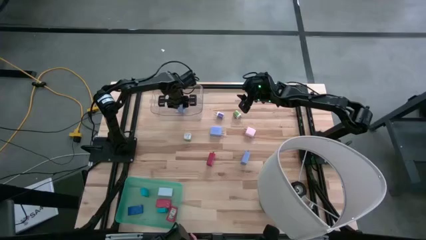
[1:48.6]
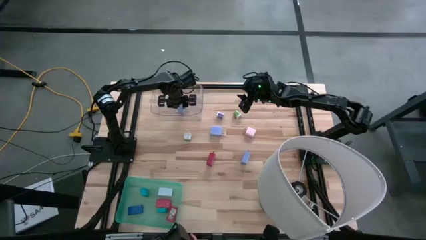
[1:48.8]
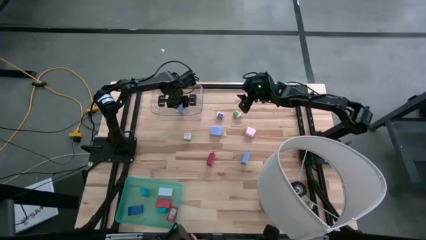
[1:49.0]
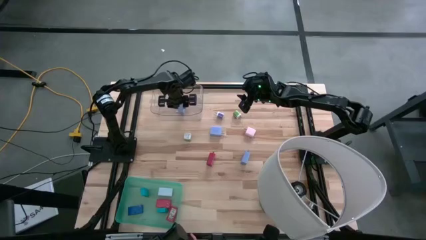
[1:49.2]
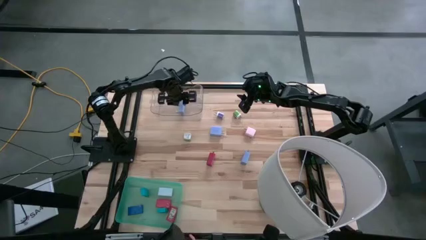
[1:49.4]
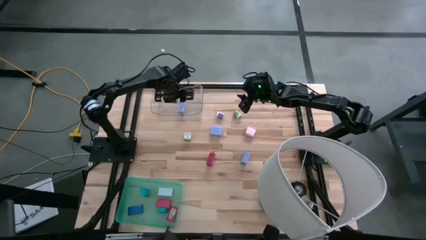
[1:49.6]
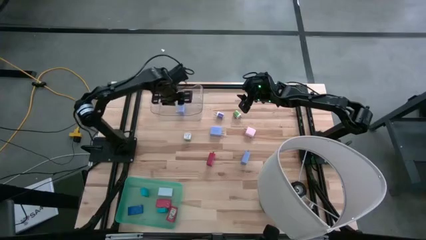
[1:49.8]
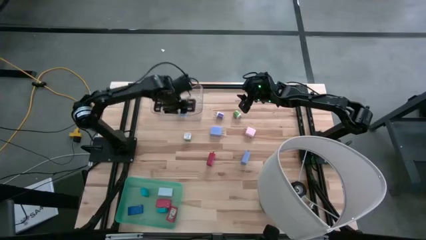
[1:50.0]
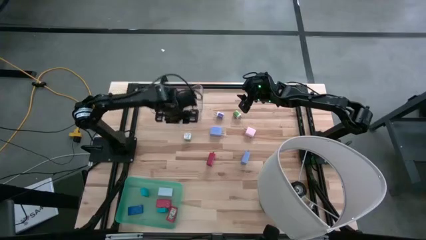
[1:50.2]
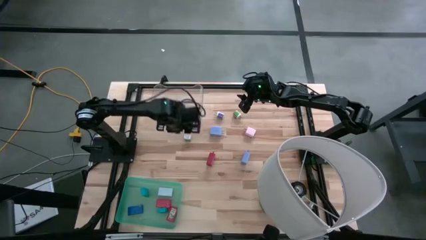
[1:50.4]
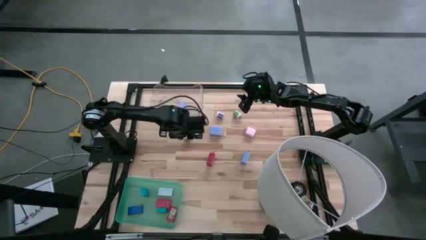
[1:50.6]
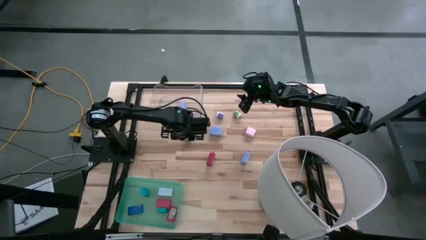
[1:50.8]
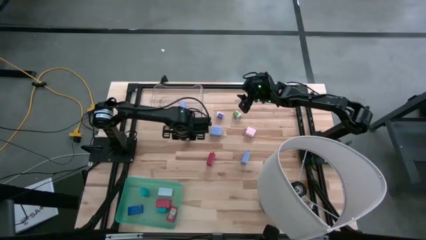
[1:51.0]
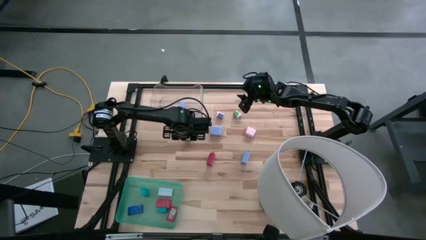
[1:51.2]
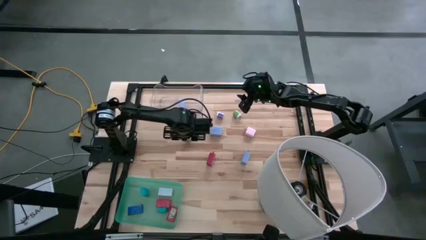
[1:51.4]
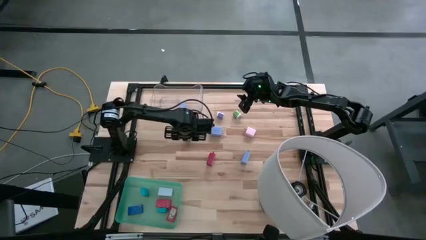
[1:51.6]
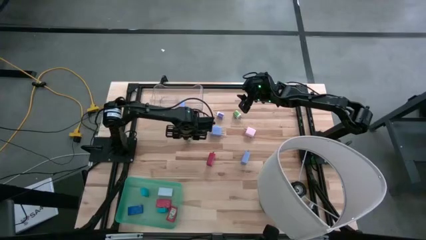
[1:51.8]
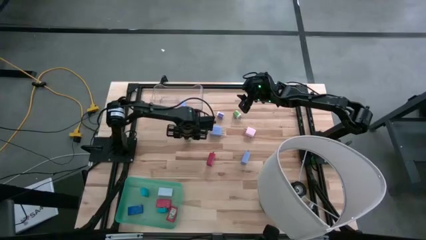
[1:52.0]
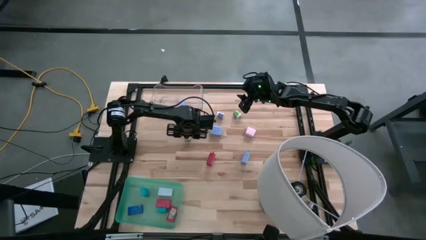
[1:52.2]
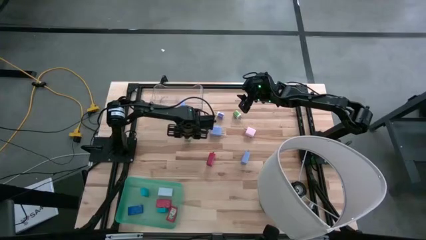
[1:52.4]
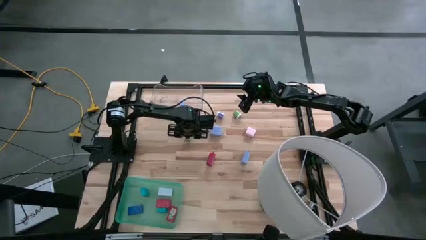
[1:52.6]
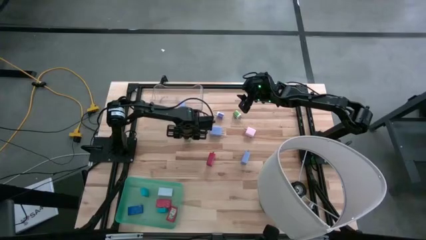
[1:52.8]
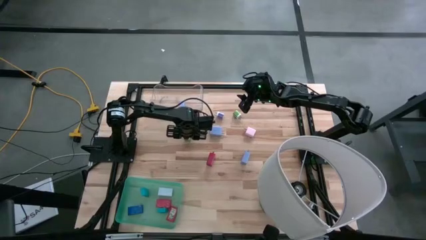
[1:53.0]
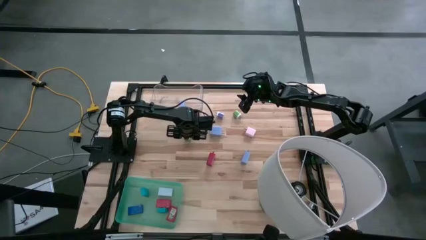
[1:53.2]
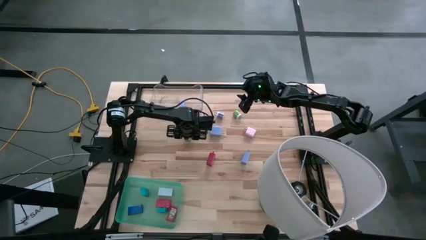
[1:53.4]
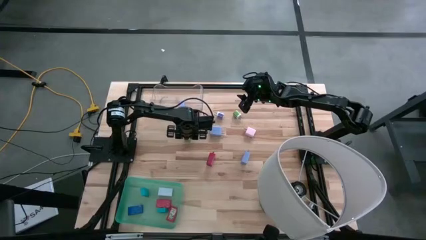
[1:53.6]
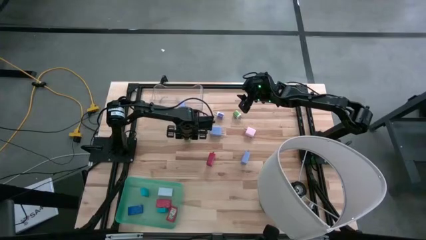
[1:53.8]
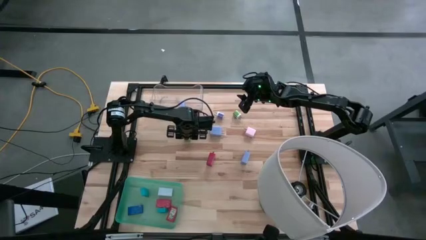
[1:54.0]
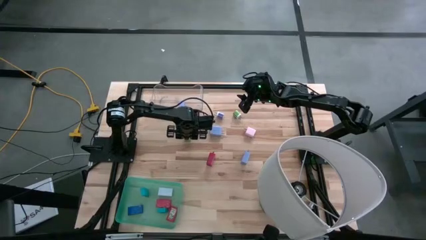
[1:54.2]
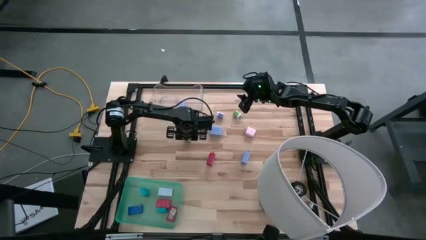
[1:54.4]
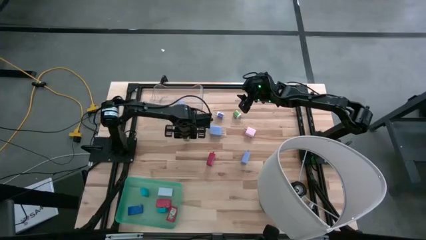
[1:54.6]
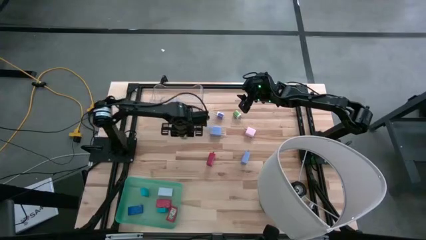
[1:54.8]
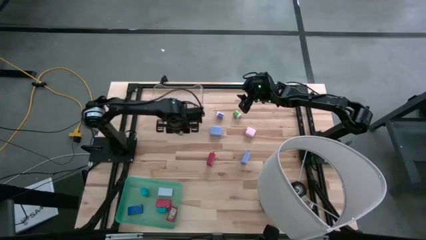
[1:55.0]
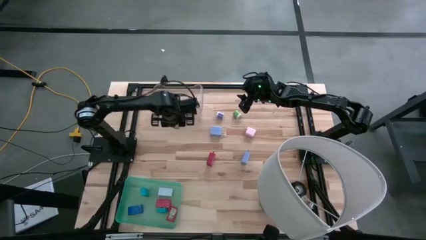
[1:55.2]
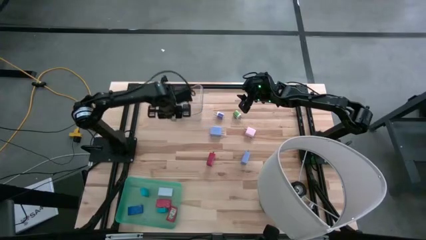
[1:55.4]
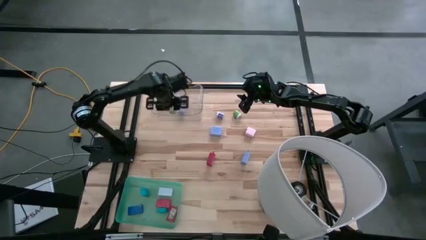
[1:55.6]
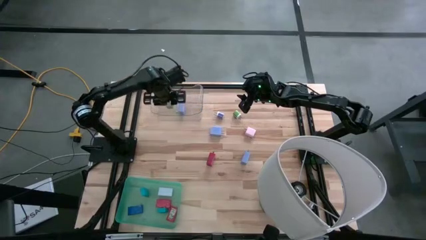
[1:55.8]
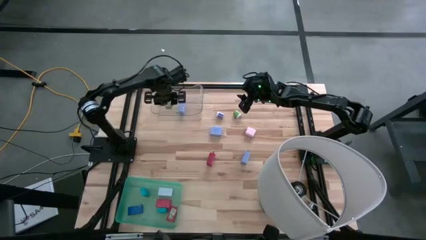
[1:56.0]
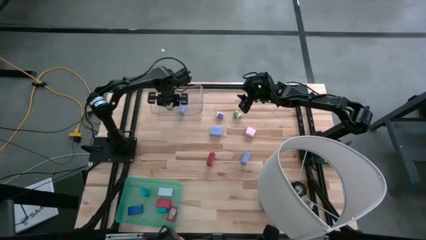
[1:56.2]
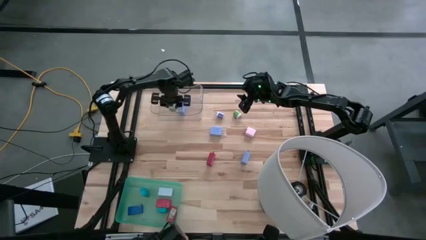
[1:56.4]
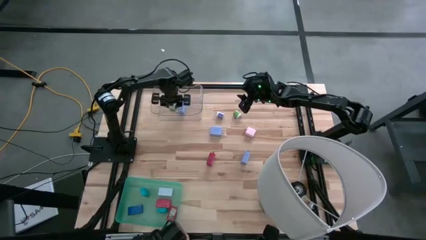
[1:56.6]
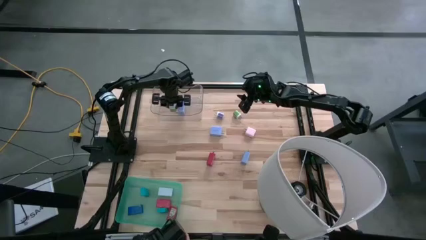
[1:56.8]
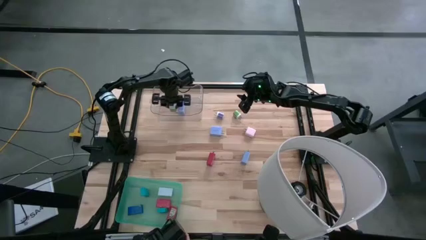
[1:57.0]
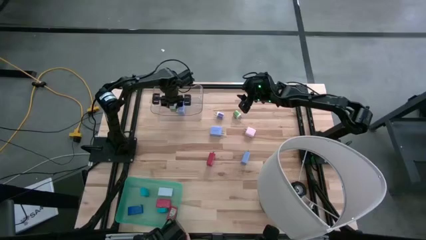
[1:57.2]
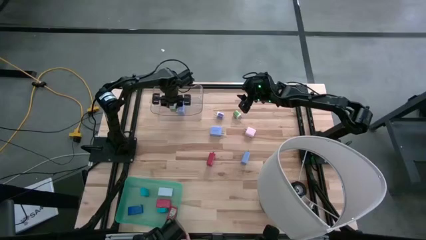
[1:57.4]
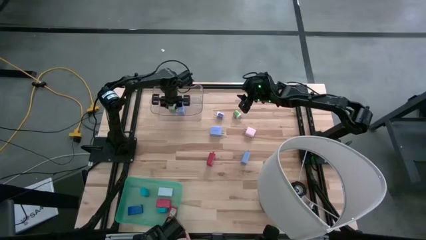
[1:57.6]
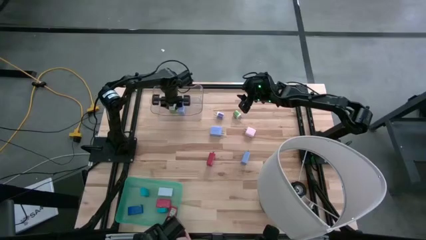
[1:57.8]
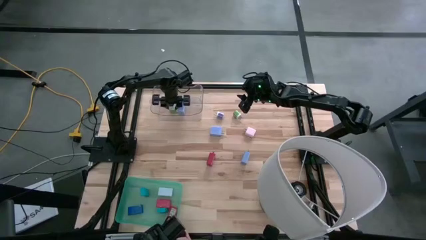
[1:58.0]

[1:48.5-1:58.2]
Task: Pick & Place Office items
Put the left green charger adapter into the transparent bin

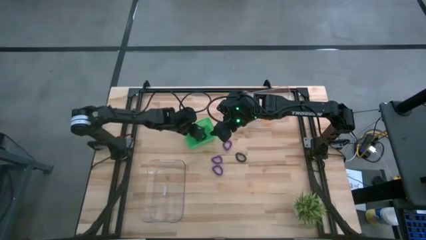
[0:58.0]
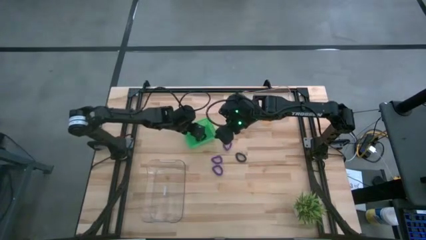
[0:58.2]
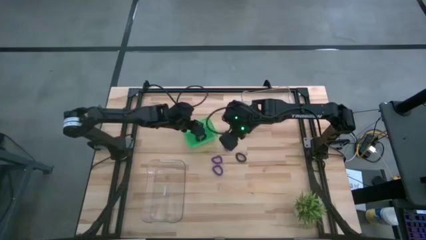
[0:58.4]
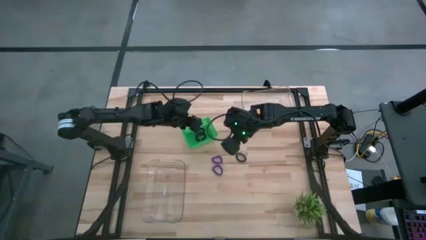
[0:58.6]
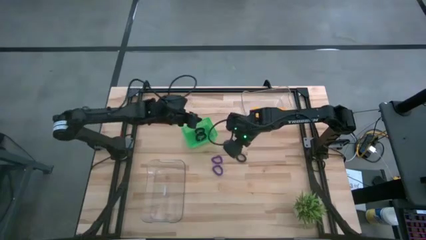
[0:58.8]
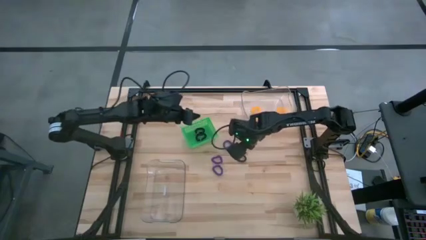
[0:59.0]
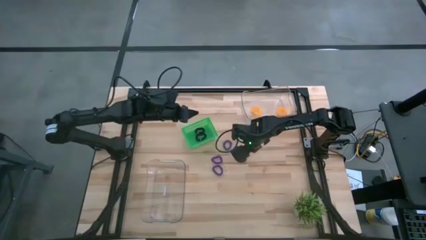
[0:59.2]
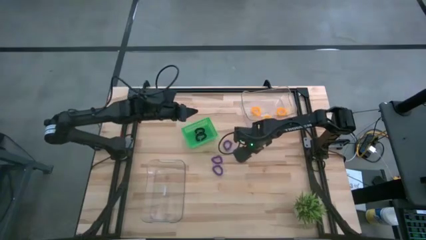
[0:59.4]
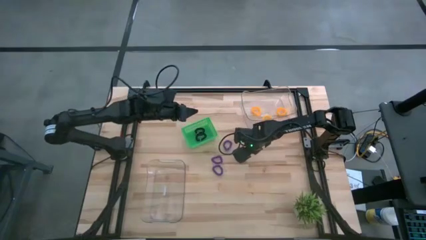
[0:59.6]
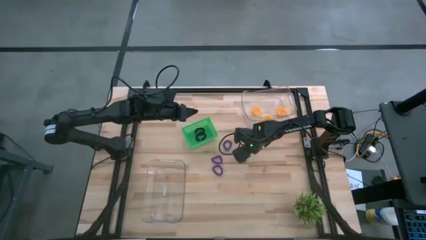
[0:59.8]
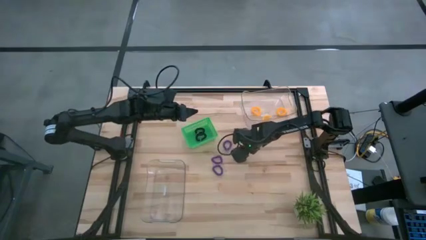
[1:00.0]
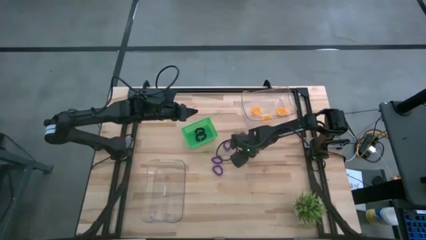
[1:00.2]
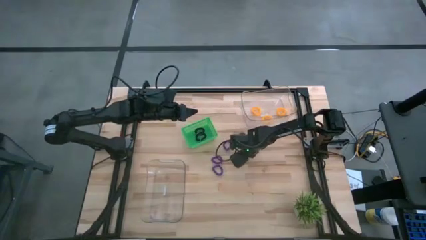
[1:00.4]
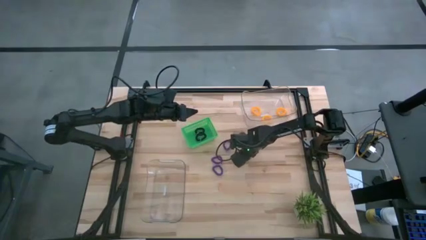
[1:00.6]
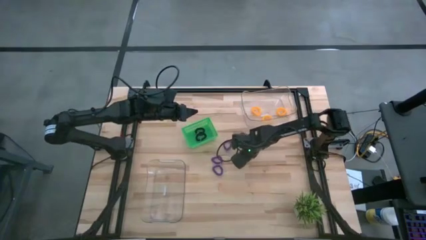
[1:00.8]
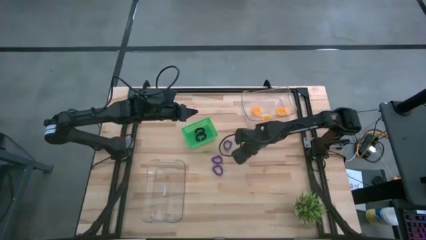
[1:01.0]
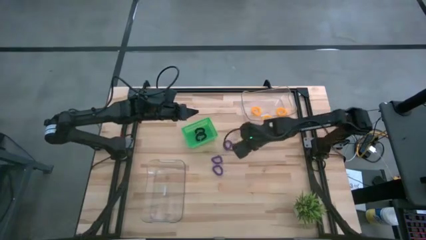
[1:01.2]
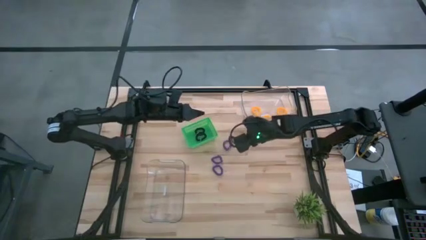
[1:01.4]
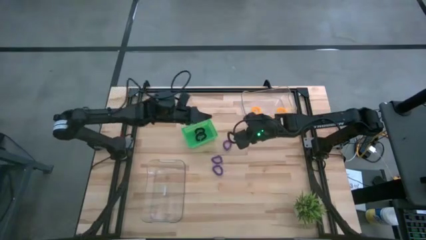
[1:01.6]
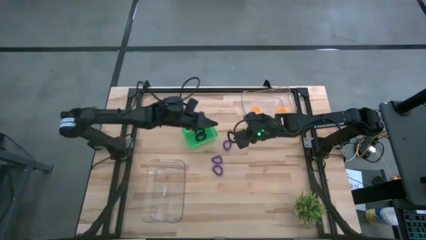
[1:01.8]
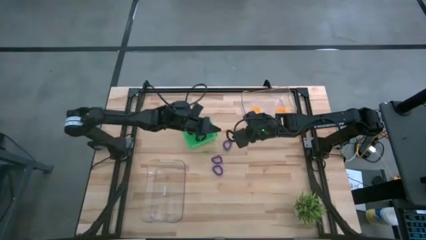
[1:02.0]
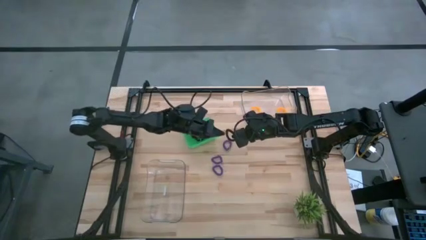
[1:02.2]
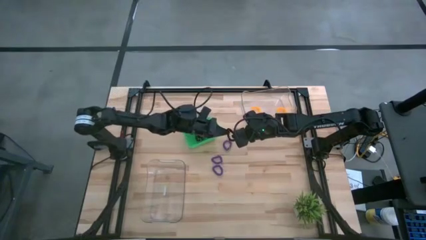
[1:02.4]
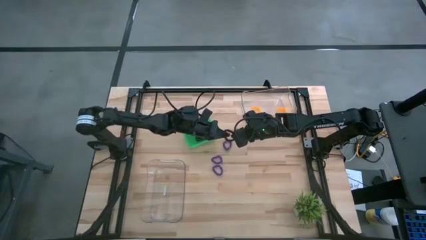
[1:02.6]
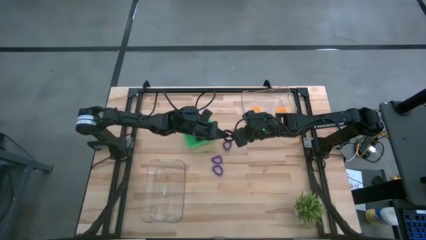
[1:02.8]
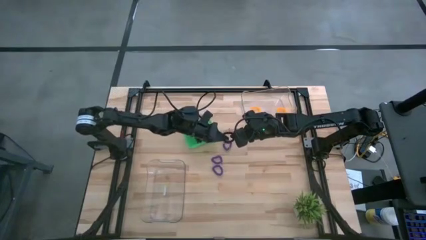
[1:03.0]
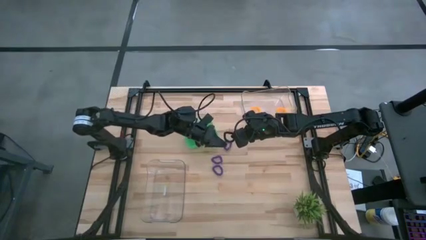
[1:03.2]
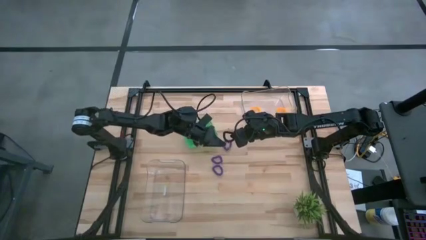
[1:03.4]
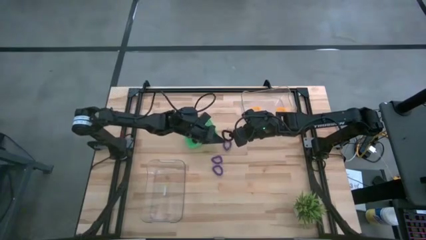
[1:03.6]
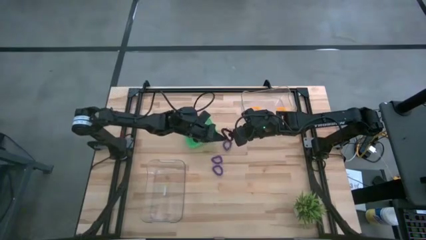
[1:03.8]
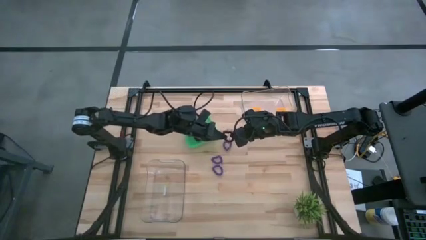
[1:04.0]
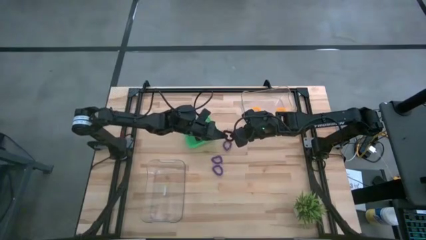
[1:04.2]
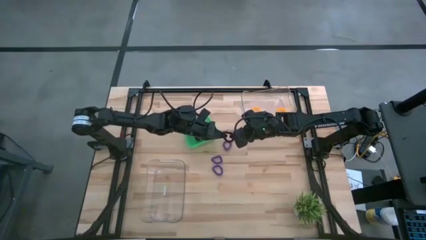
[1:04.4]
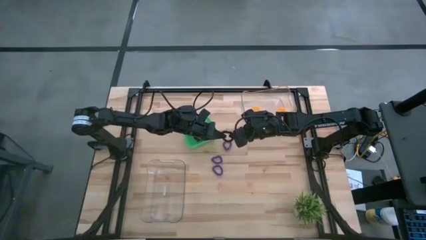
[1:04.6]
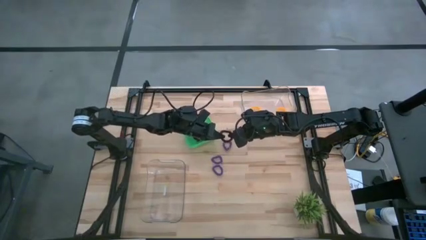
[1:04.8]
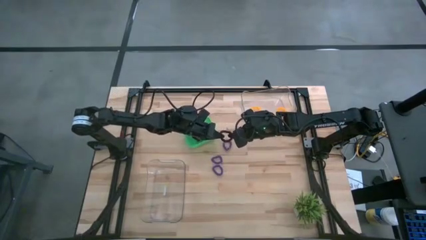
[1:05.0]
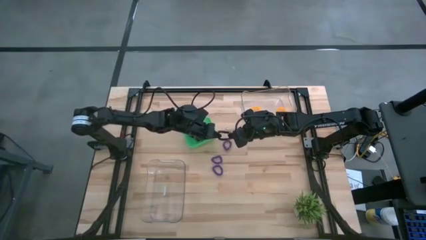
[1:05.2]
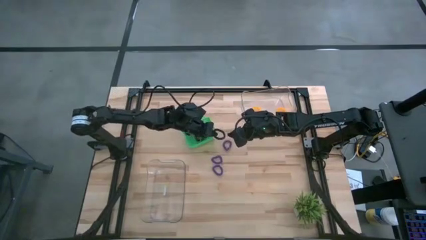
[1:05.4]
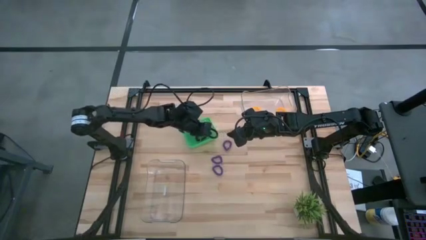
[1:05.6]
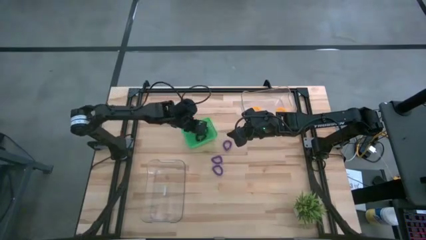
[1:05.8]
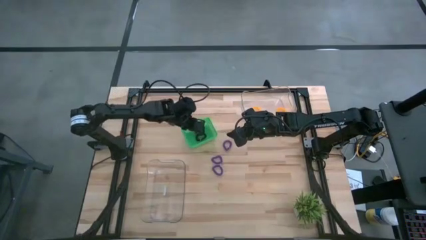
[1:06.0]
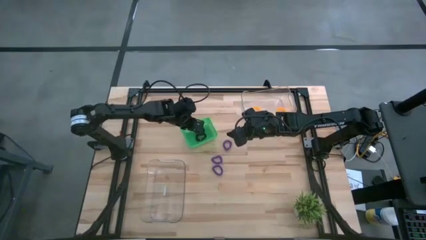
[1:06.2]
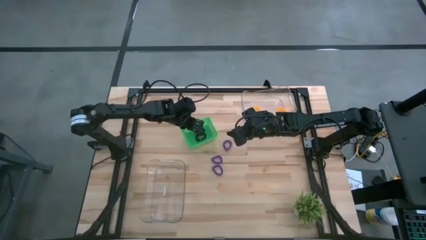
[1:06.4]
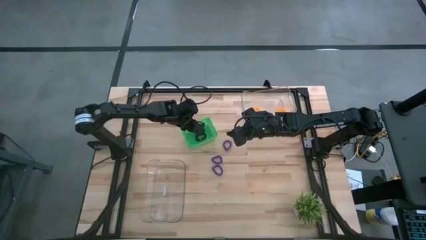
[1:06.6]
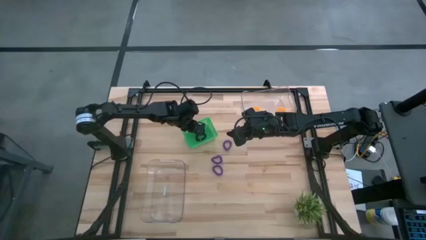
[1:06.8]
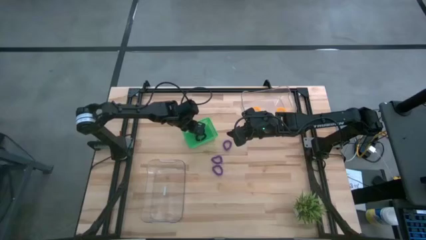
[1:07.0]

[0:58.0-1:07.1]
Task: Sort spring keychains
Put the black spring keychain into the green bin
